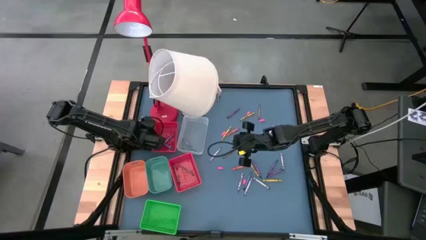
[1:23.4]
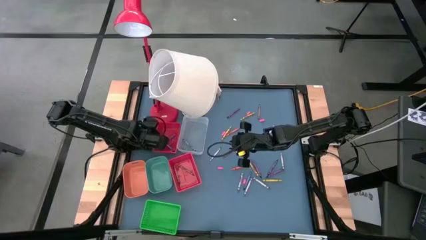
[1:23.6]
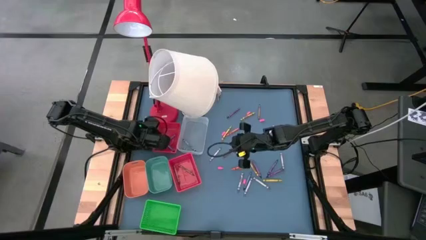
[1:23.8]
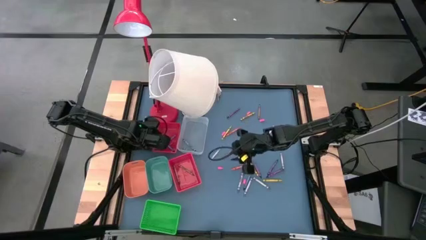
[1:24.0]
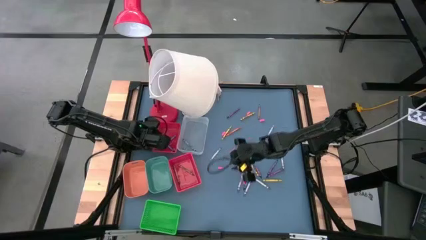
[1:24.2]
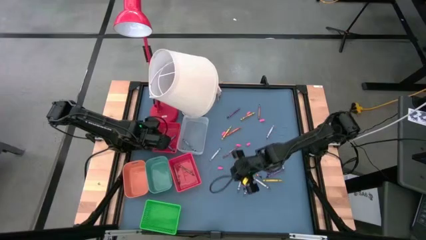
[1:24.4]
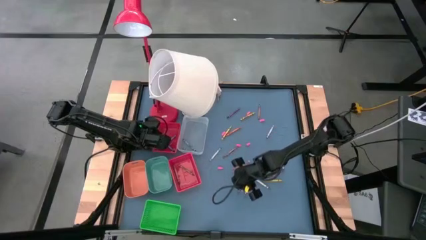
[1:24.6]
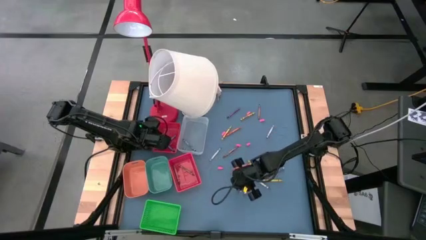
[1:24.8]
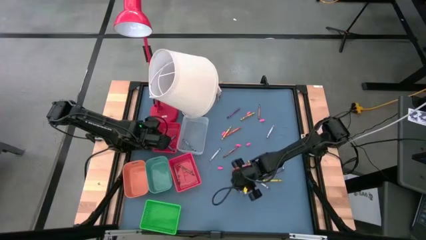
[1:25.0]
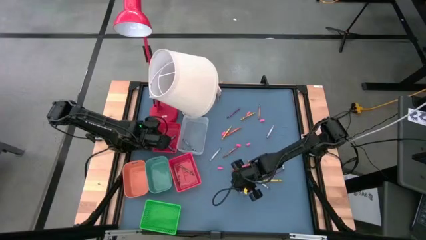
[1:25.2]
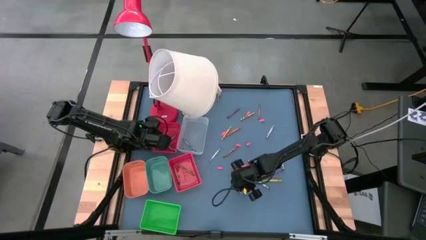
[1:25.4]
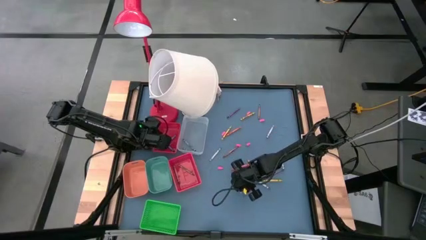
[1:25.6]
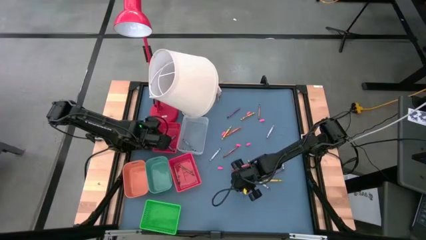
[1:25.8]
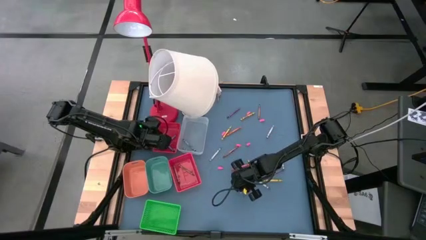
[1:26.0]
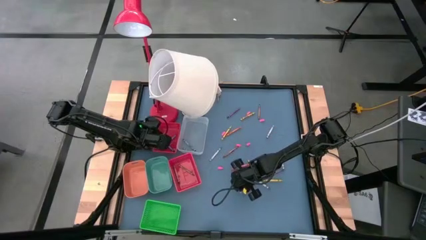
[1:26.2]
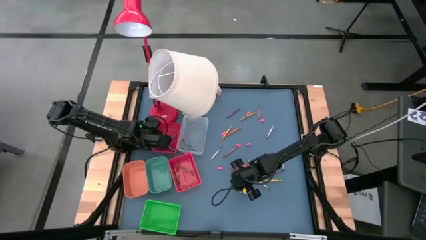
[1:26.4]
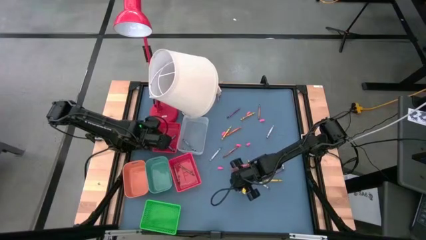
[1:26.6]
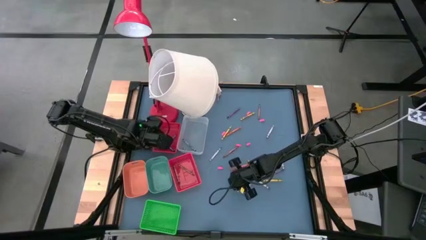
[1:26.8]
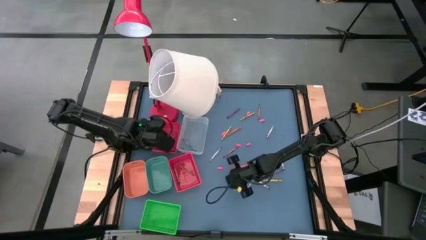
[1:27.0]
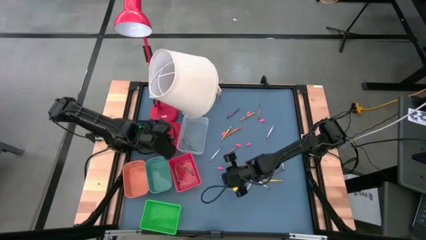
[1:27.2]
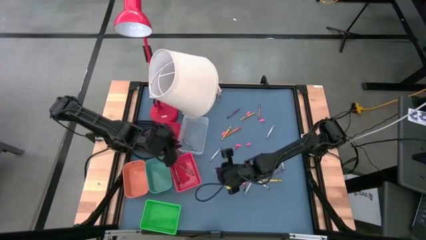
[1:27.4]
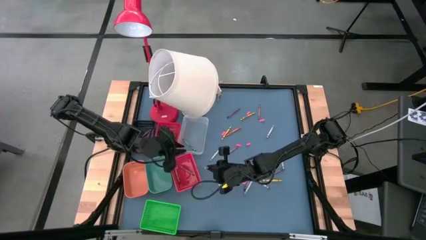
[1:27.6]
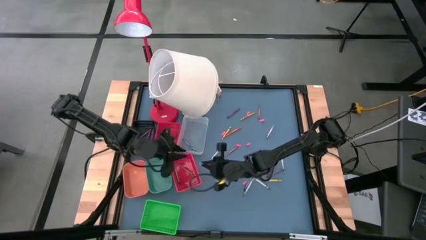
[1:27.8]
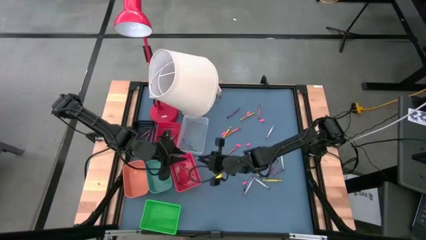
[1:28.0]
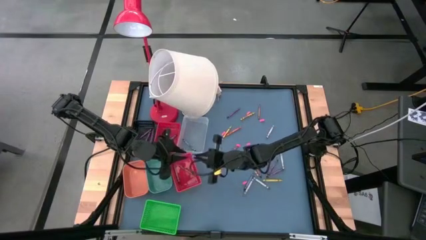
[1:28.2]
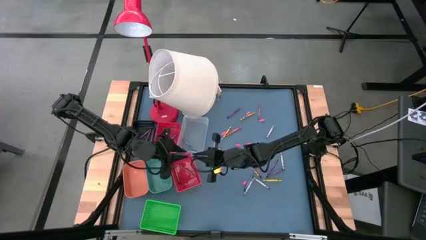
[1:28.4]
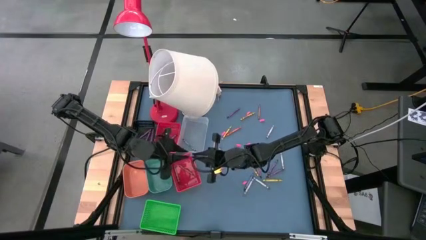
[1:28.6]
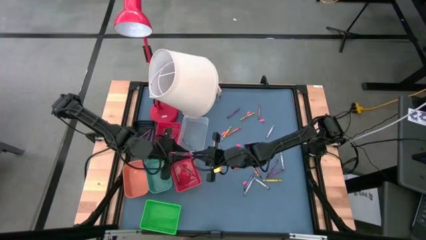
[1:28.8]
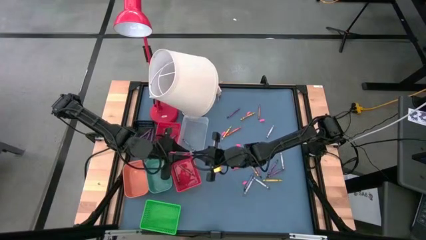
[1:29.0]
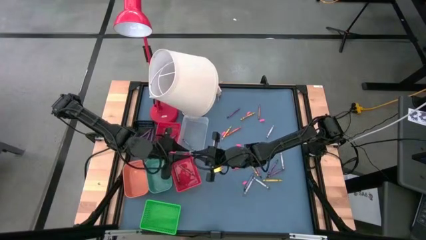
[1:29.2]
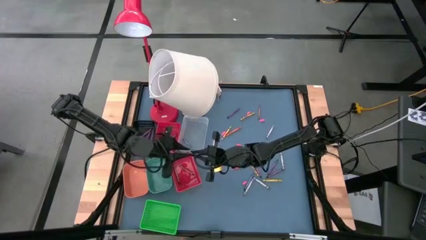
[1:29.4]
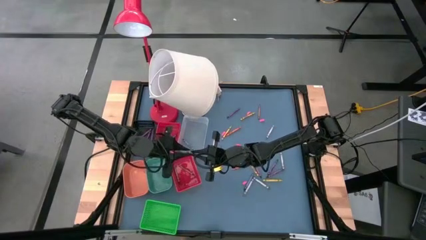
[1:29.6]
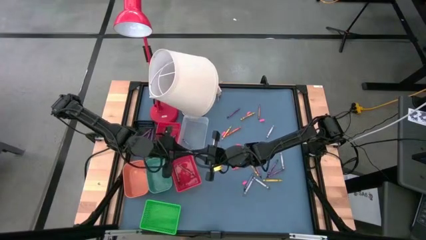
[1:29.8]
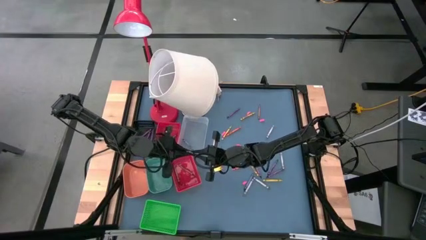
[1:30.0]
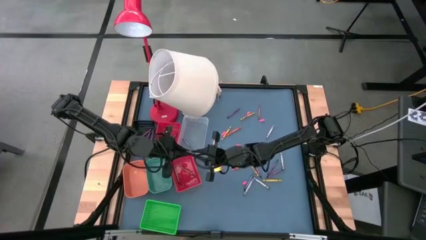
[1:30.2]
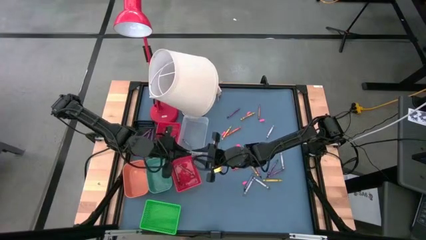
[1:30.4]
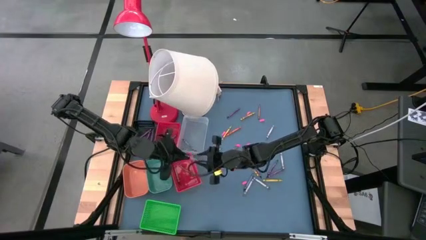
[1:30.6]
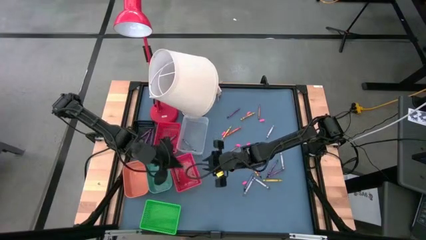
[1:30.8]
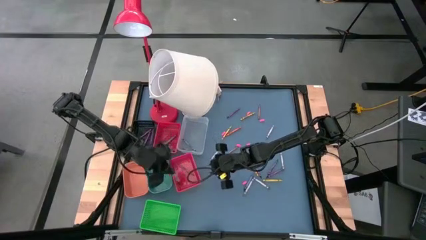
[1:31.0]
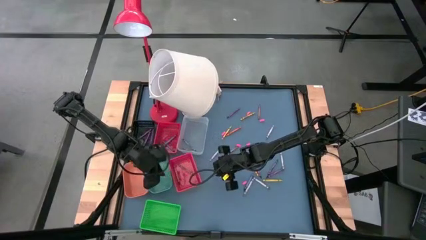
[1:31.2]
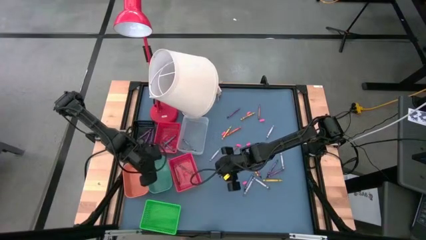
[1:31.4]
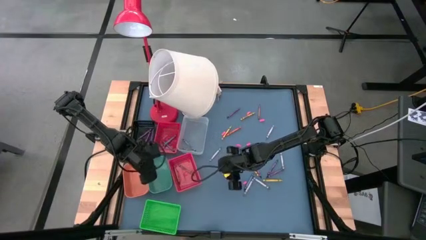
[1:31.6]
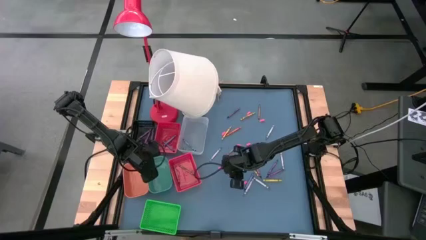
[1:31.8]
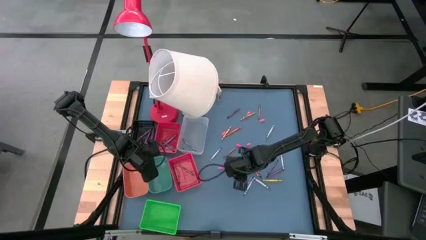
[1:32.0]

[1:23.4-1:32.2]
Task: Sort crayons
Put the gray crayon into the green bin

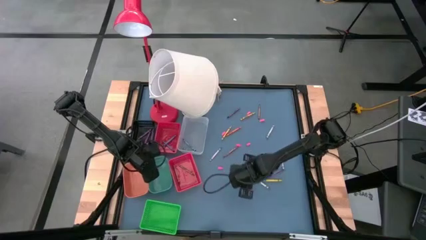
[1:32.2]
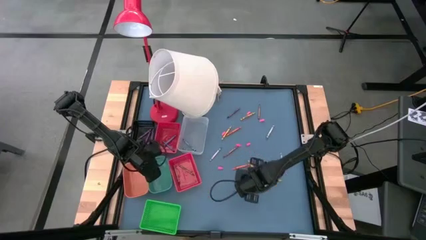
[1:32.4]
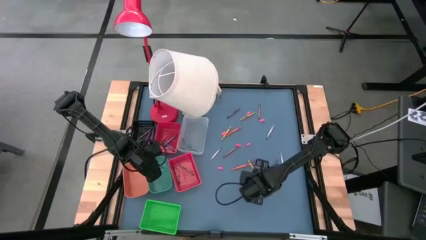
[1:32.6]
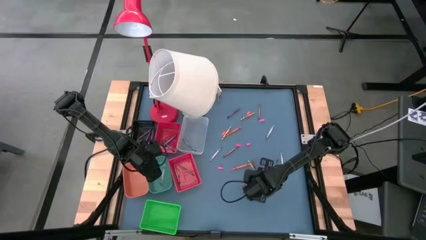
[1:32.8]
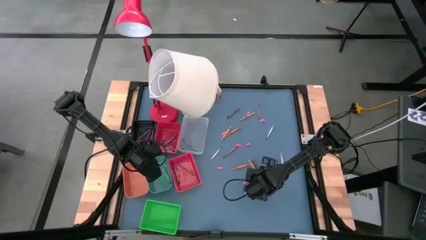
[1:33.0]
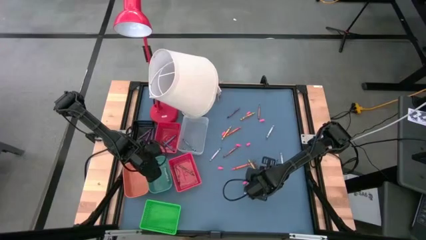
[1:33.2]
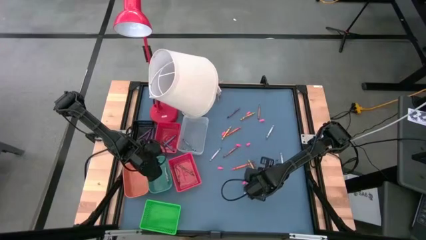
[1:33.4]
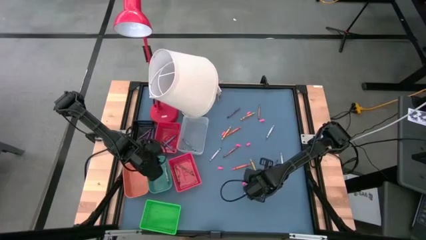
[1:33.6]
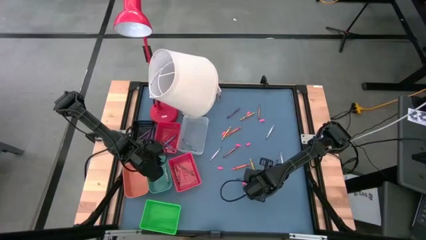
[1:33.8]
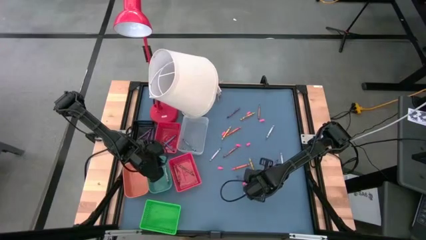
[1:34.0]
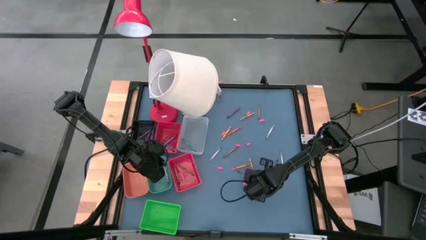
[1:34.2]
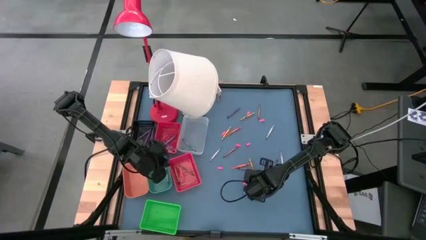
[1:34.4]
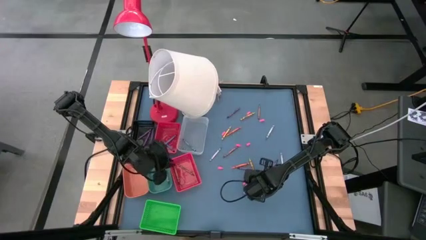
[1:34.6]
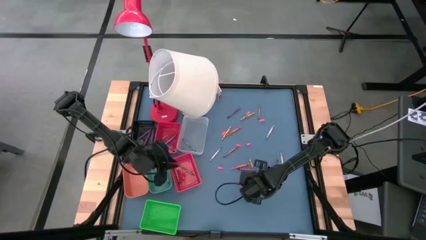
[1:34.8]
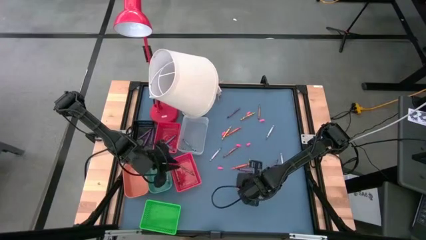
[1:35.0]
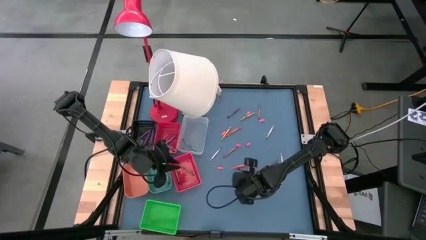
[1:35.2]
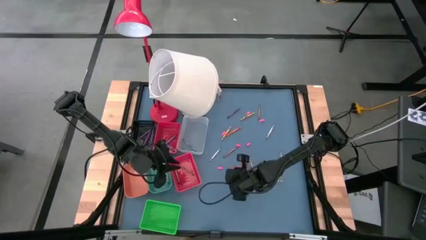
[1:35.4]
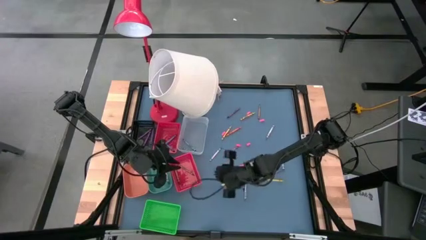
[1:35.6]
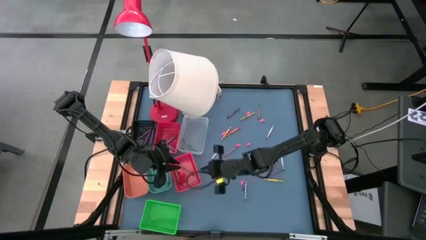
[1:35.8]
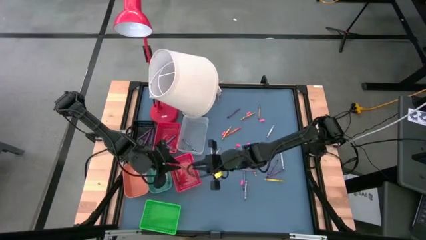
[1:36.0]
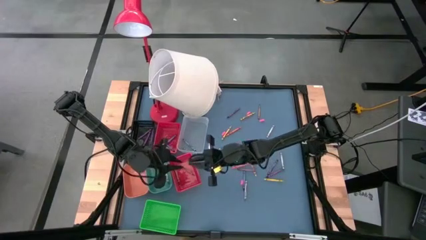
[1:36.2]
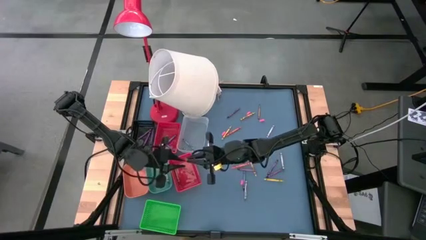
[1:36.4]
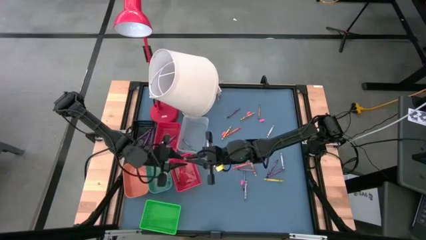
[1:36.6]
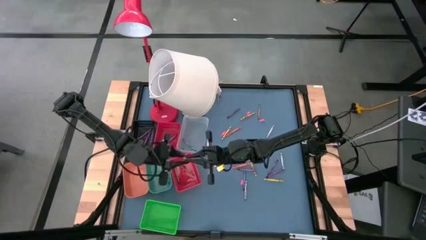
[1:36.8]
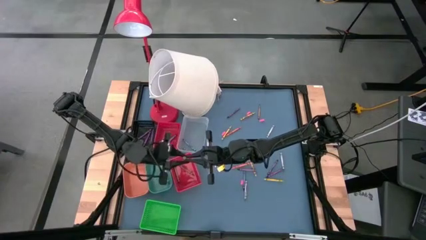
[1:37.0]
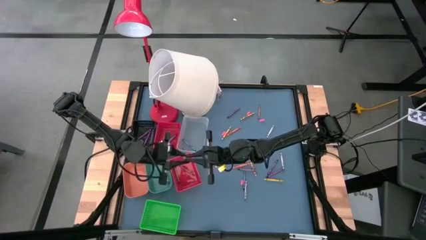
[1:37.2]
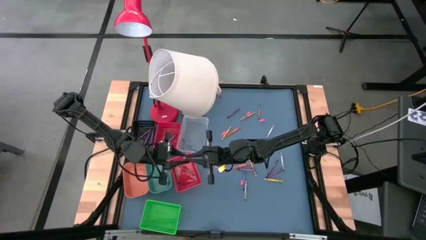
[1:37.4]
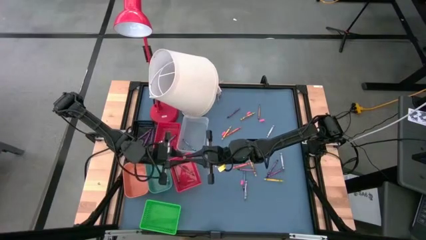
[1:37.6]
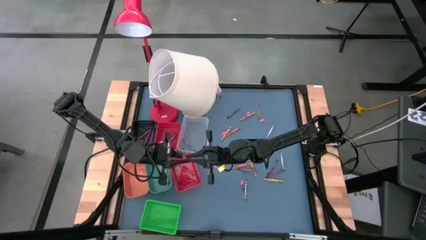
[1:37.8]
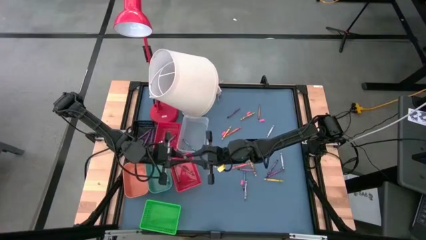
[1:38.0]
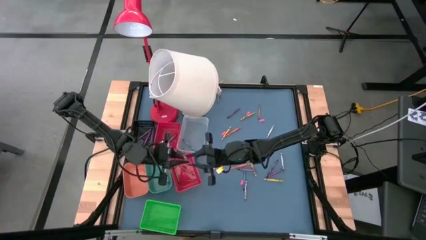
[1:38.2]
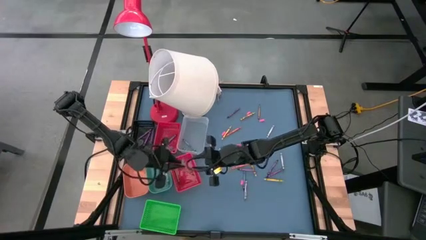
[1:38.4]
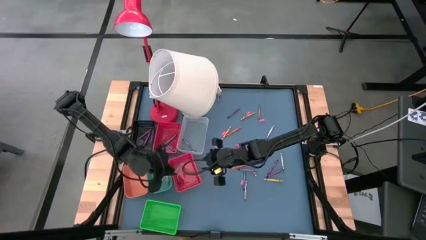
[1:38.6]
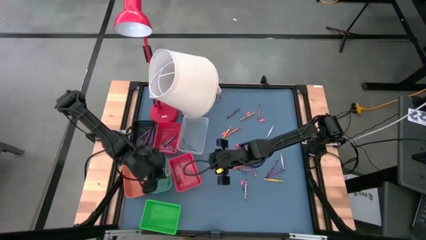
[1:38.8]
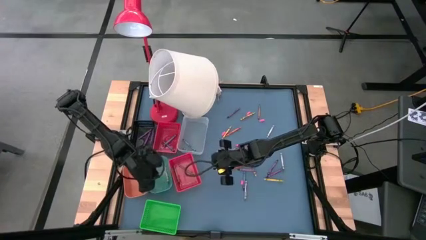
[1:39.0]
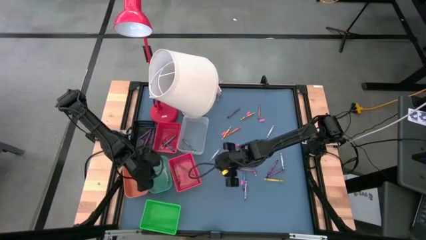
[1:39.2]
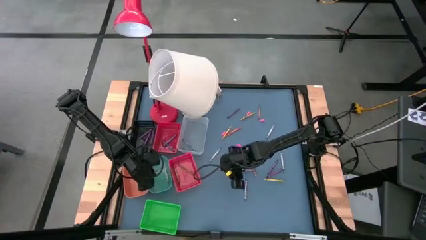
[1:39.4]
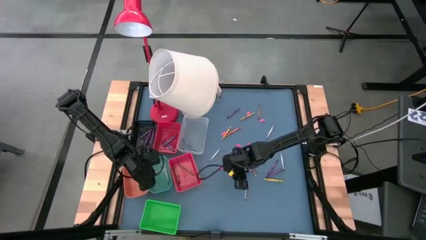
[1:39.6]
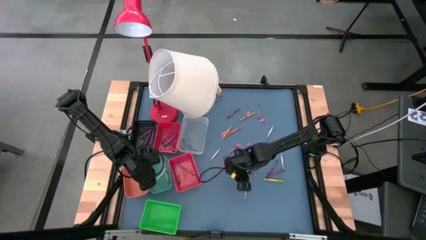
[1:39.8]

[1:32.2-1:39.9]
Put the gray crayon into the green bin
